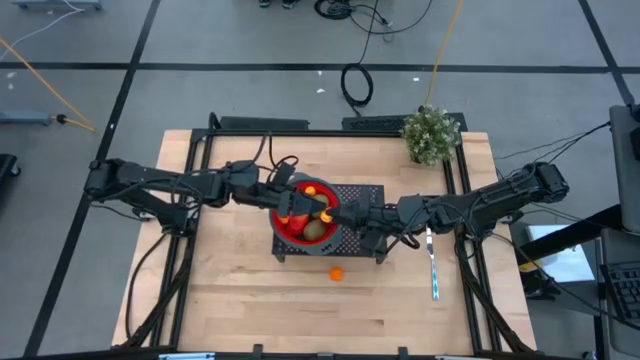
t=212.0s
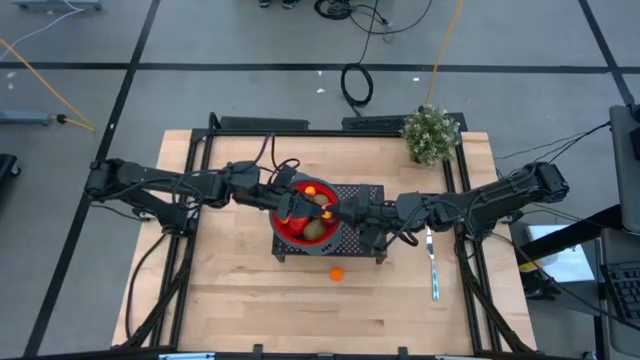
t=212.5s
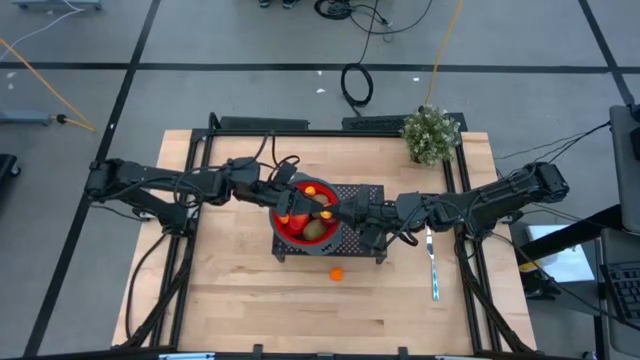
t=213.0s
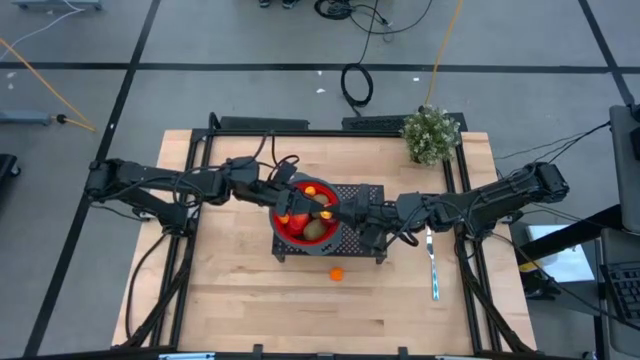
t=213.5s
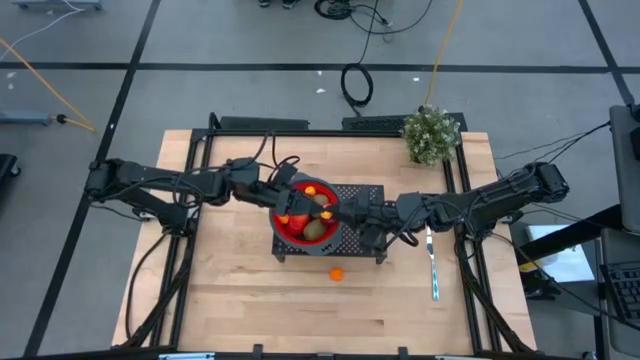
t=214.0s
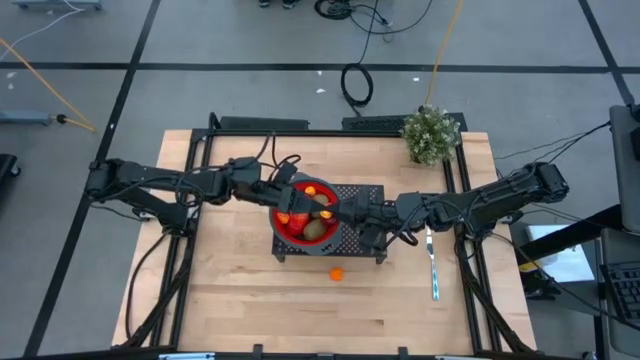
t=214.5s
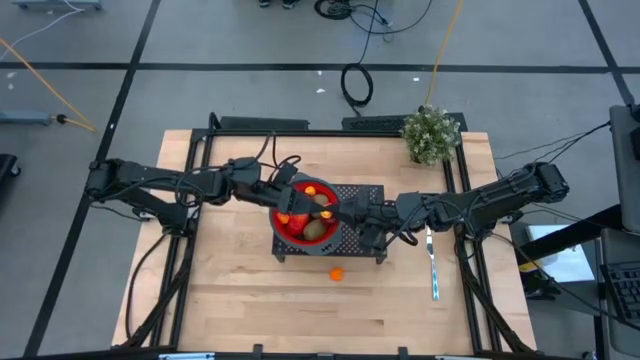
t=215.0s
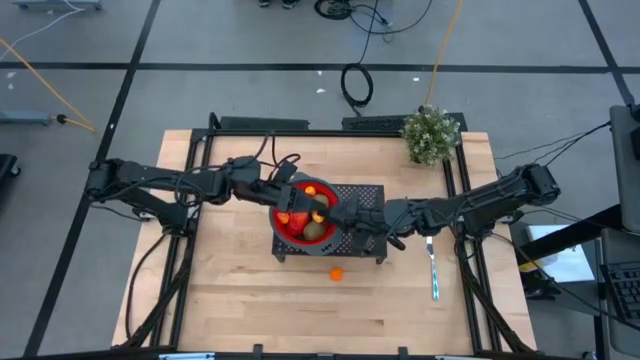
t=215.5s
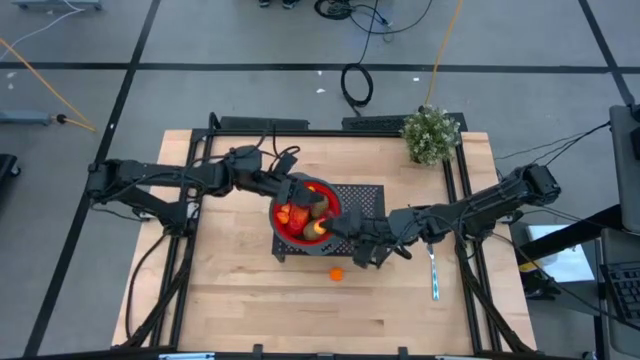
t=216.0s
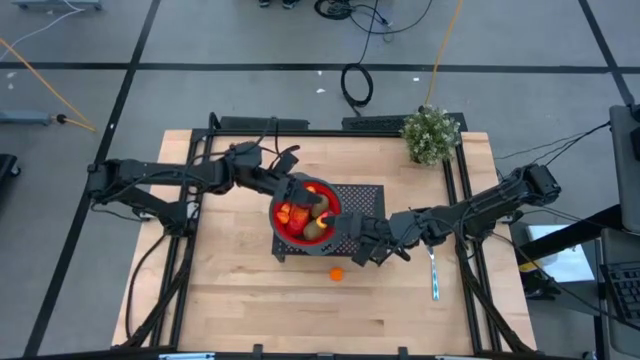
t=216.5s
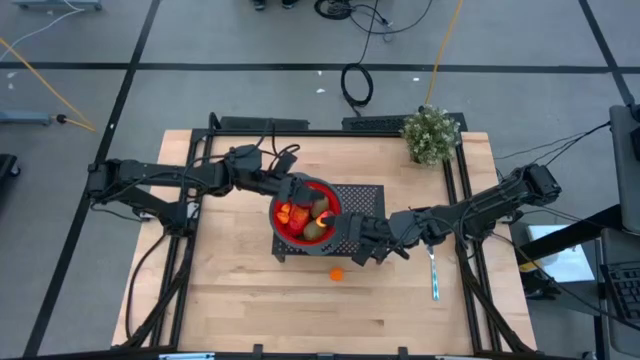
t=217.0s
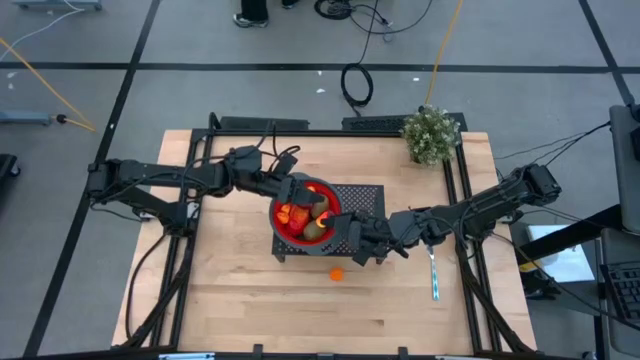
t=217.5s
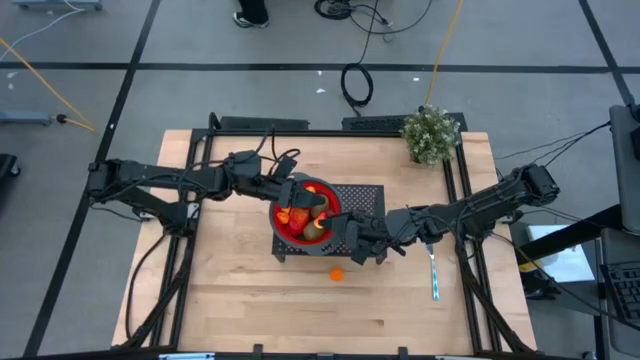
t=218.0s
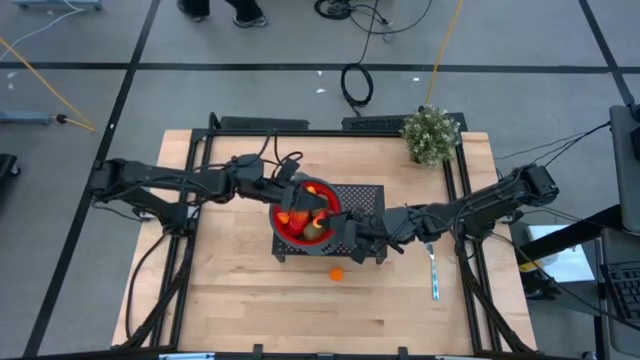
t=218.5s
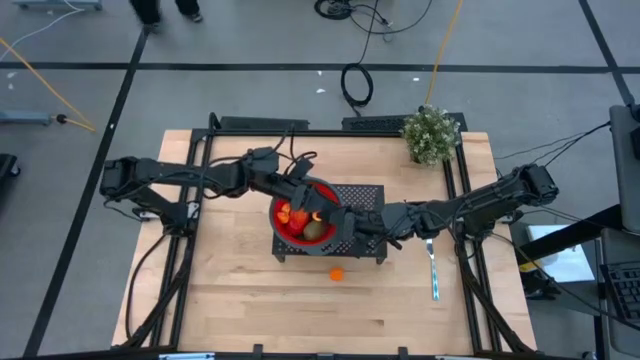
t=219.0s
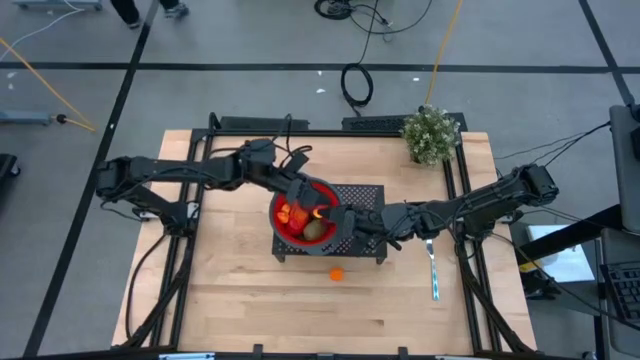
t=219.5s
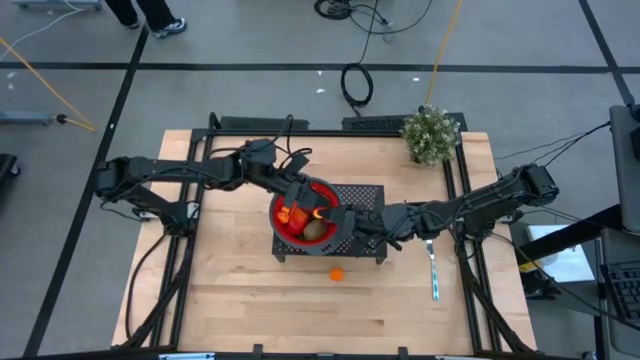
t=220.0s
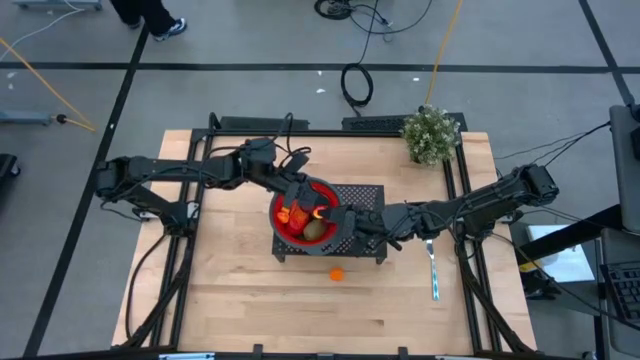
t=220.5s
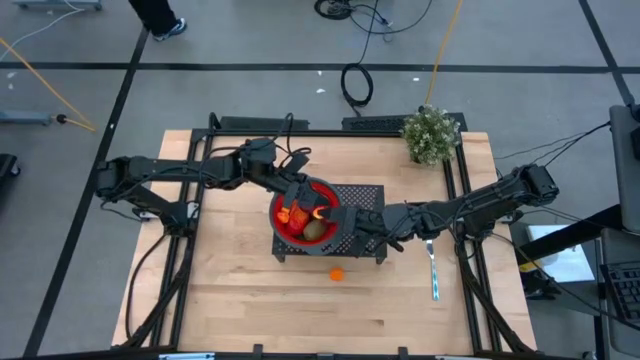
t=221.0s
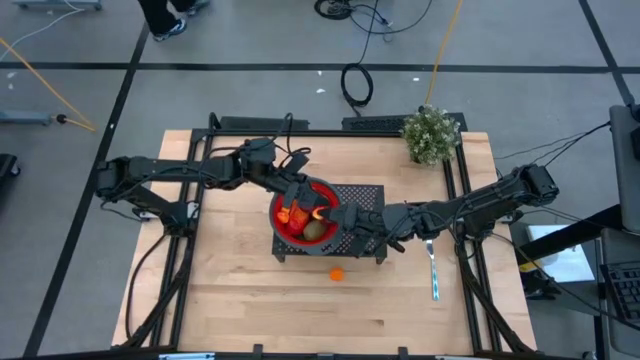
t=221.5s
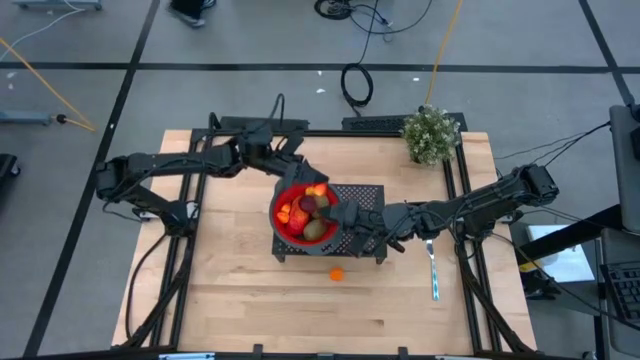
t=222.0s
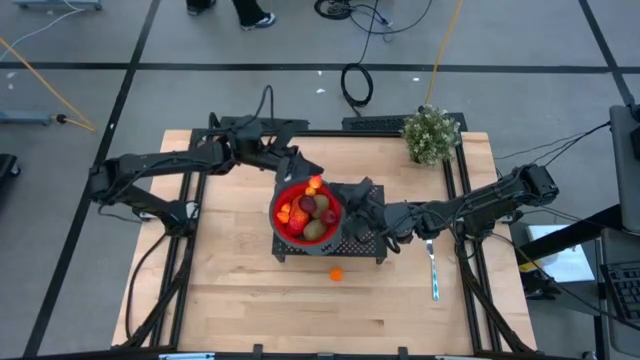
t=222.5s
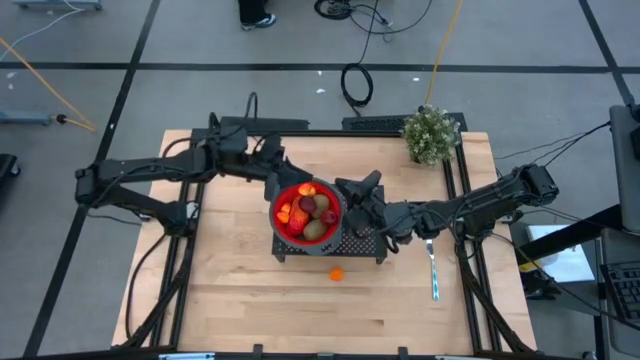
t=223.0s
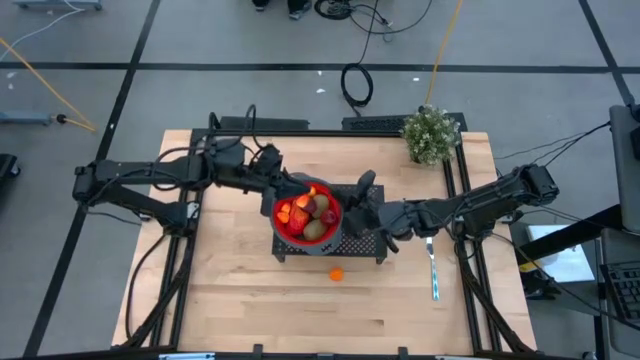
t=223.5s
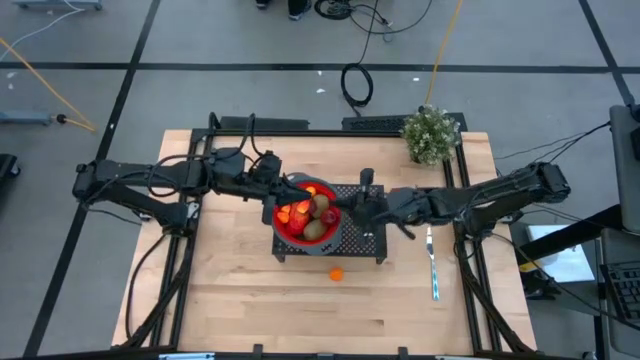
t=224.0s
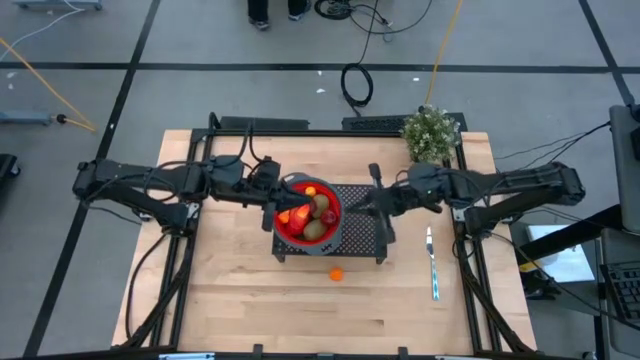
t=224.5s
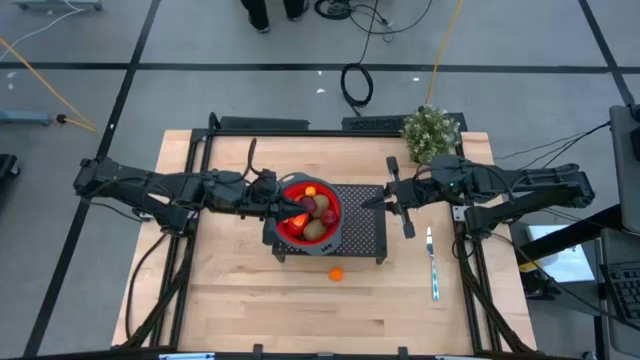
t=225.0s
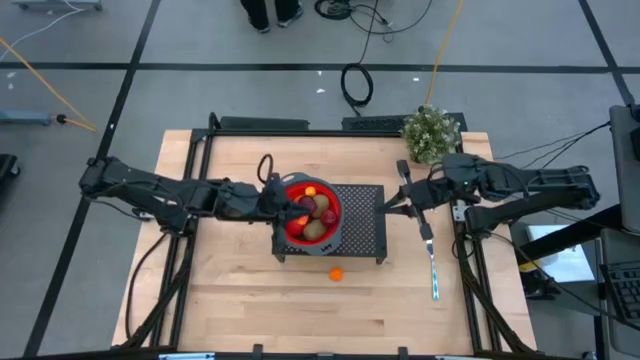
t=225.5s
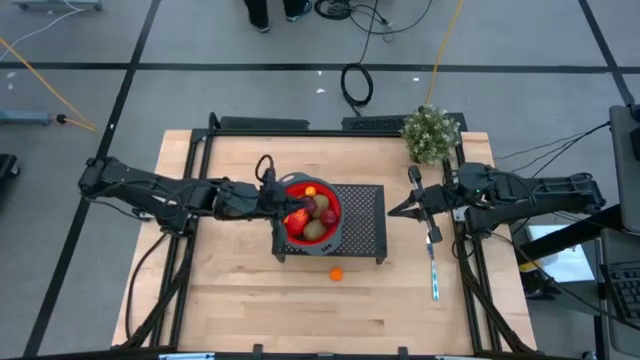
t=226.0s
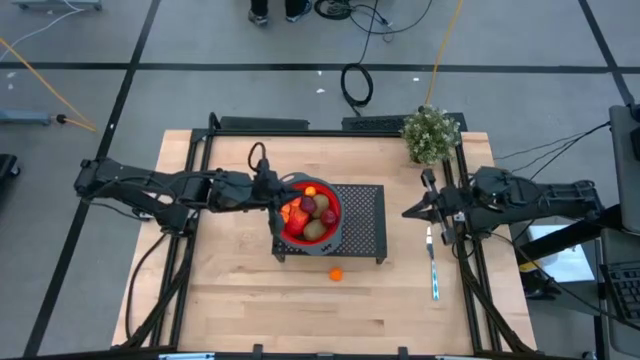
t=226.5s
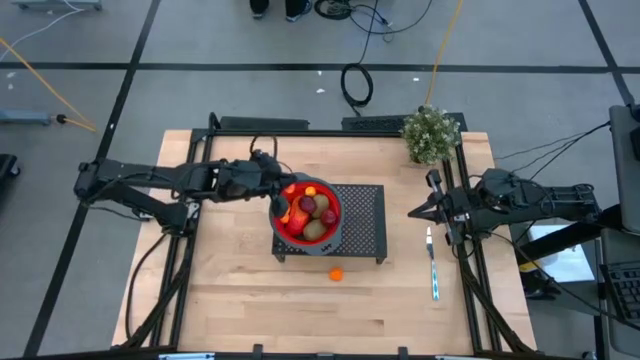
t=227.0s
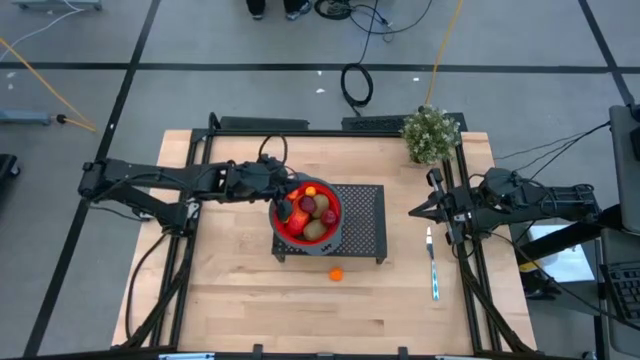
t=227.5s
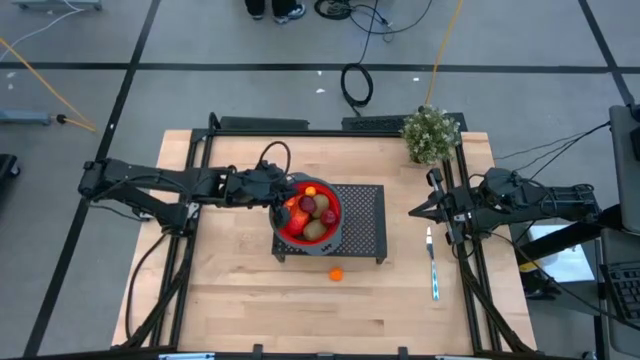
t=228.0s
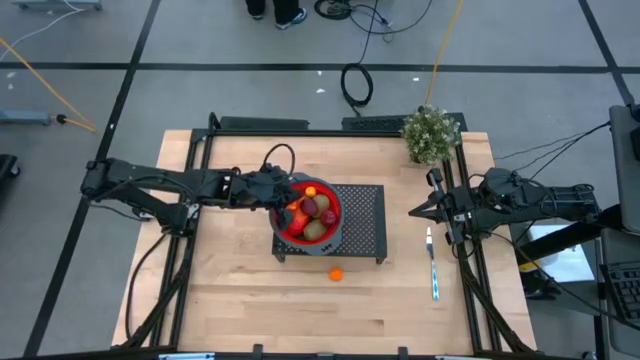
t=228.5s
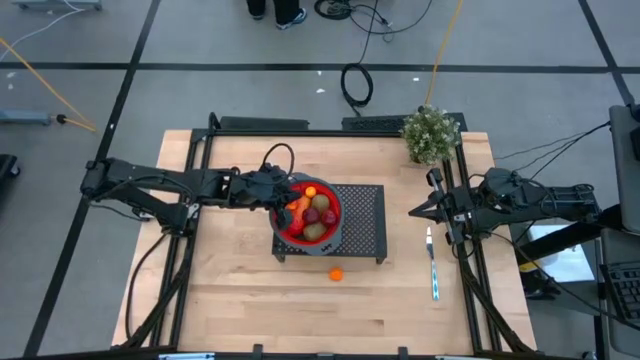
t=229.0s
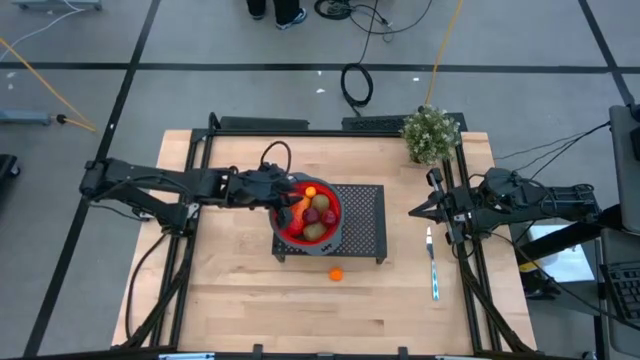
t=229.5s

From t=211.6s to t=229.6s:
Task: Pick & Place Fruit
Put the peach into the red colander on the shelf

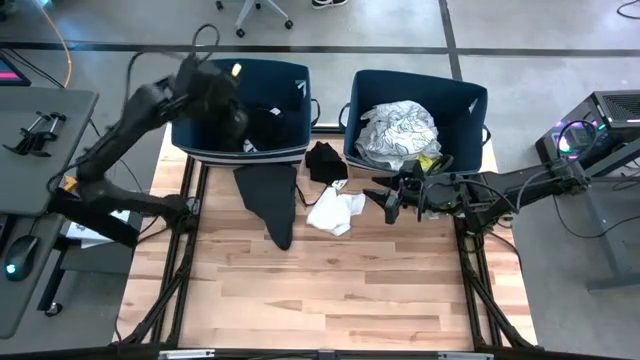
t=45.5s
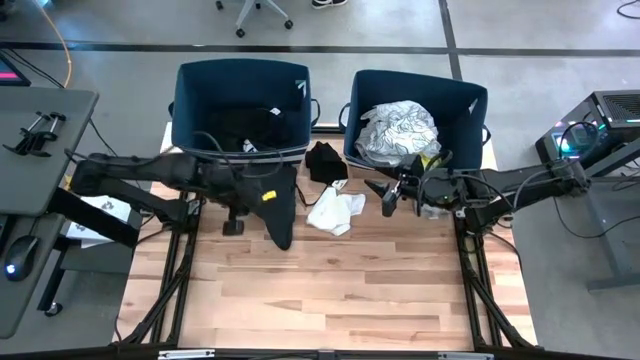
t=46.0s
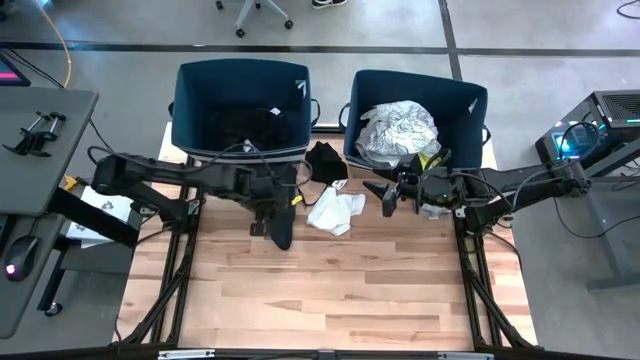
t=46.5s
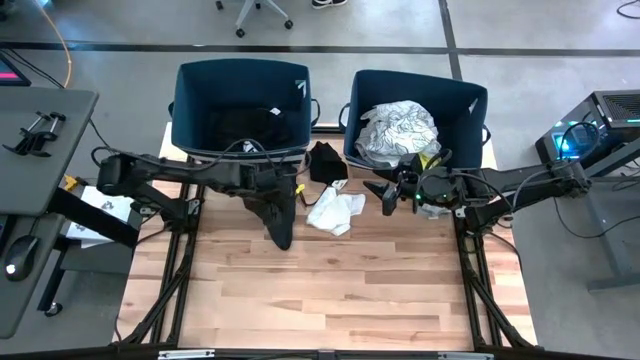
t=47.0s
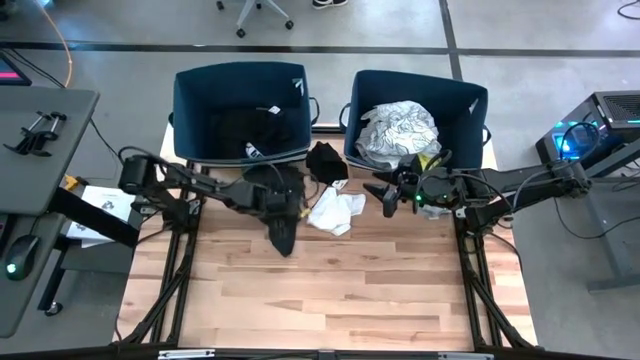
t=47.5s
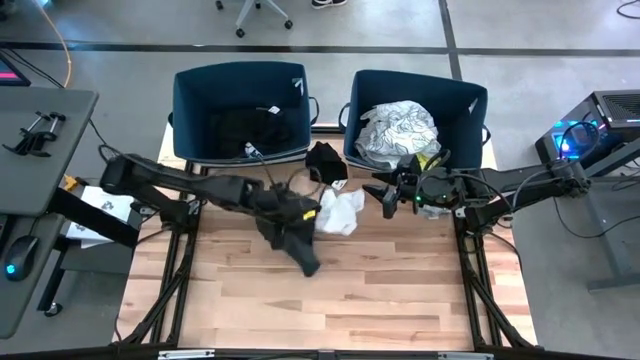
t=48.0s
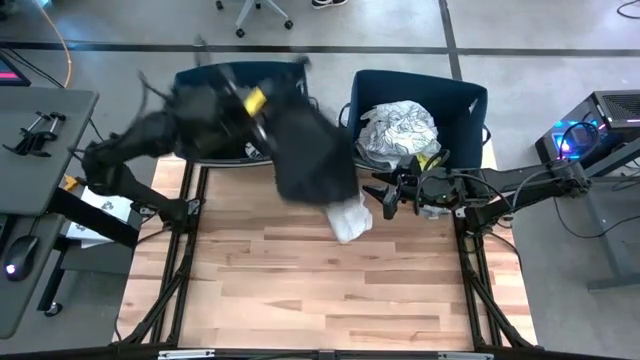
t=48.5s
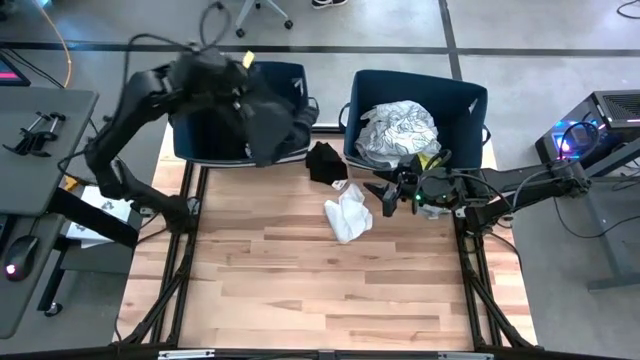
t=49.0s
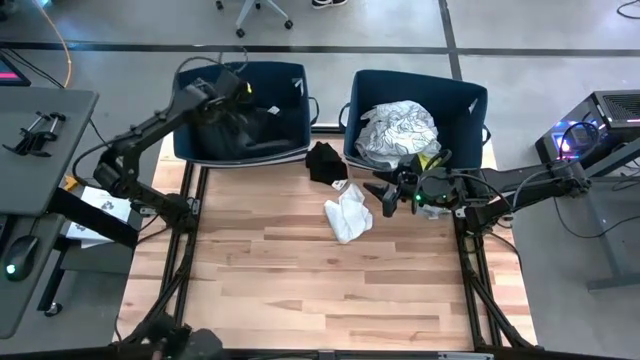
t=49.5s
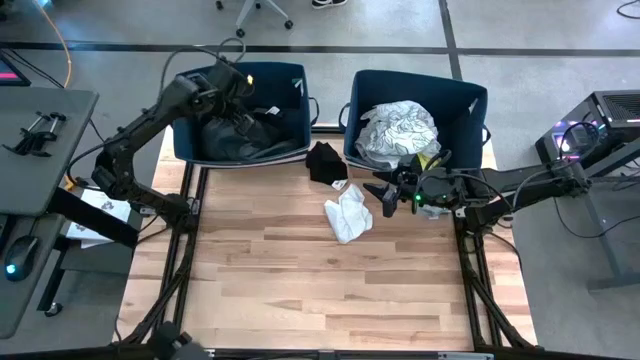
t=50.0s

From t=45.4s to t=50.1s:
Task: Sort clothes
Put the black shorts into the left laundry bin

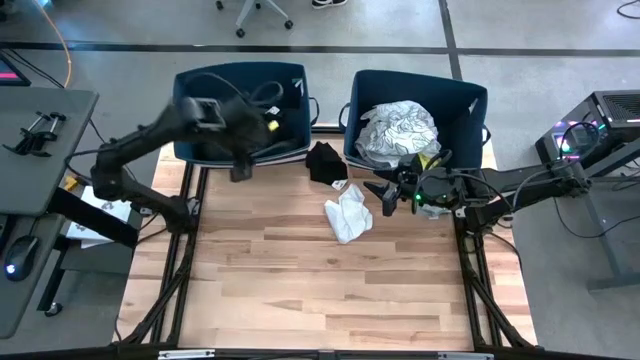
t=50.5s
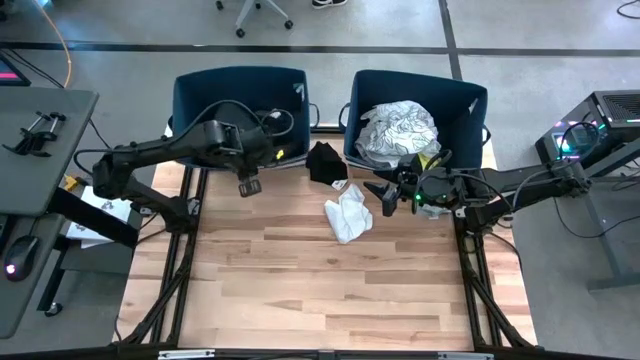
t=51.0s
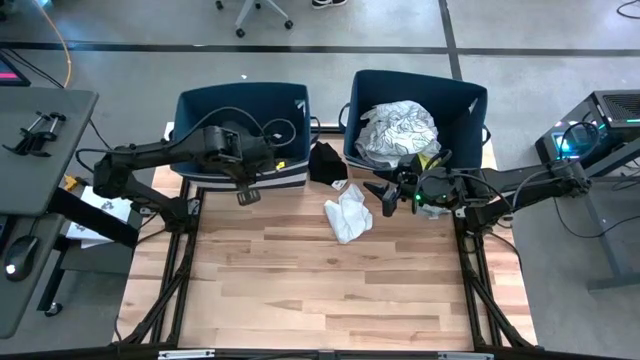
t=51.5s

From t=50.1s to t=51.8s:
Adjust the left laundry bin
